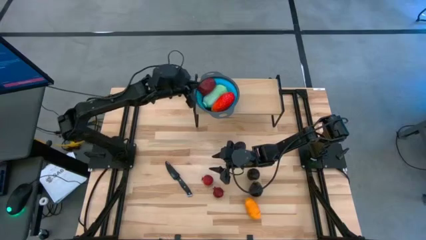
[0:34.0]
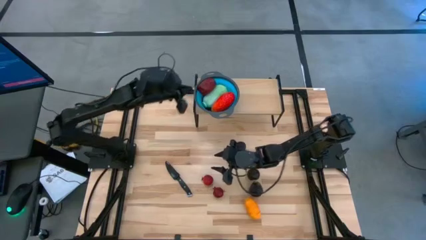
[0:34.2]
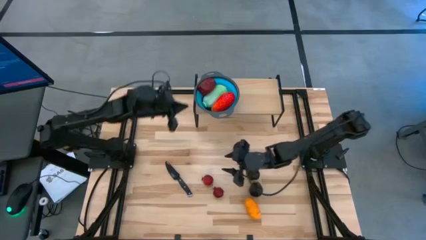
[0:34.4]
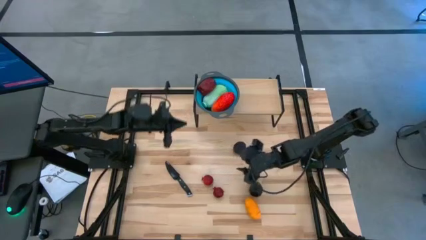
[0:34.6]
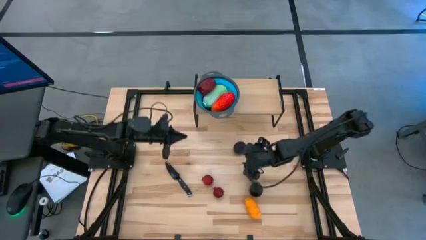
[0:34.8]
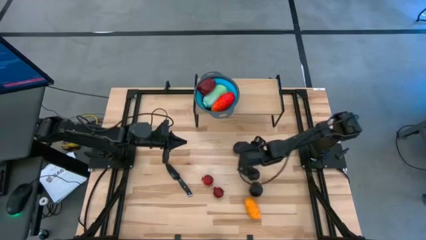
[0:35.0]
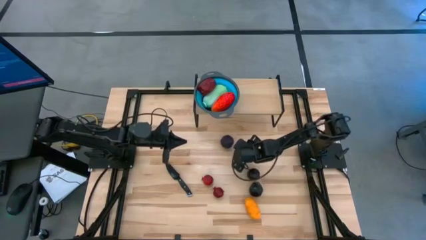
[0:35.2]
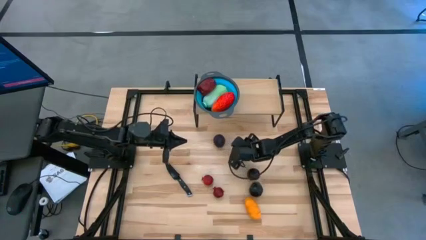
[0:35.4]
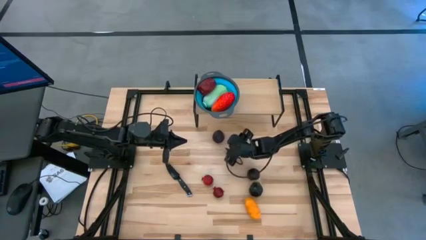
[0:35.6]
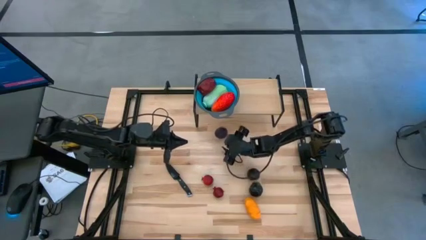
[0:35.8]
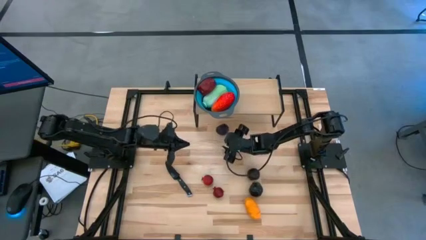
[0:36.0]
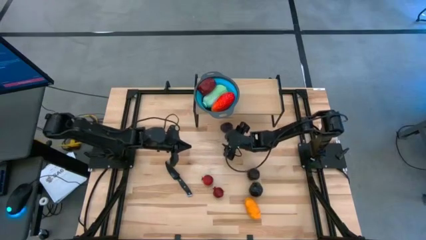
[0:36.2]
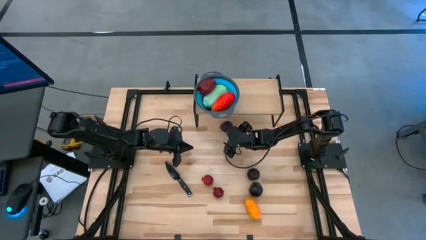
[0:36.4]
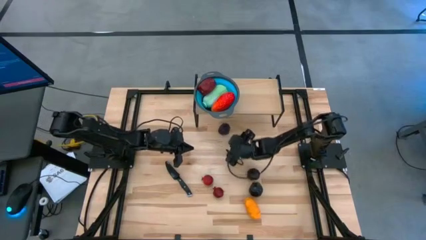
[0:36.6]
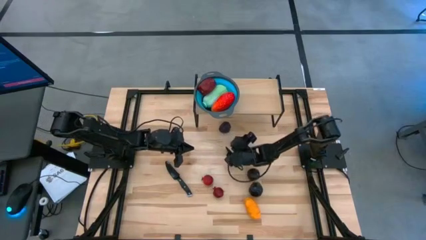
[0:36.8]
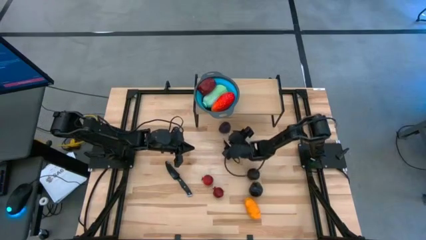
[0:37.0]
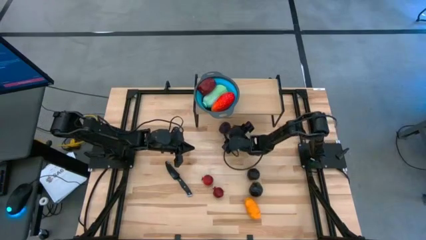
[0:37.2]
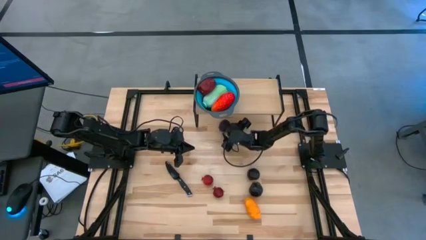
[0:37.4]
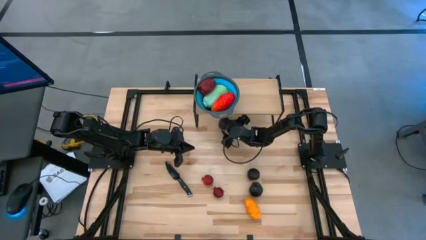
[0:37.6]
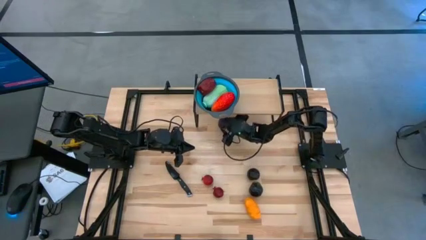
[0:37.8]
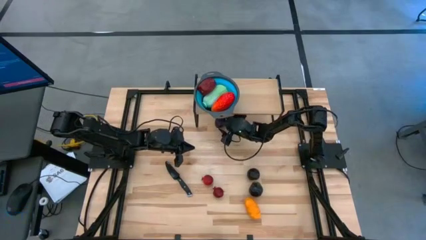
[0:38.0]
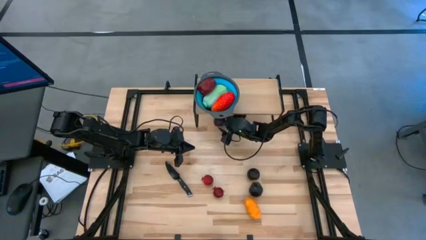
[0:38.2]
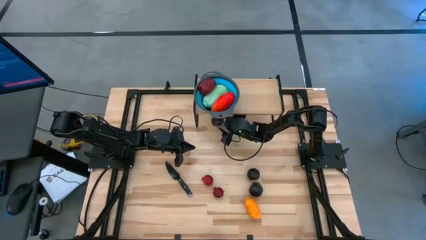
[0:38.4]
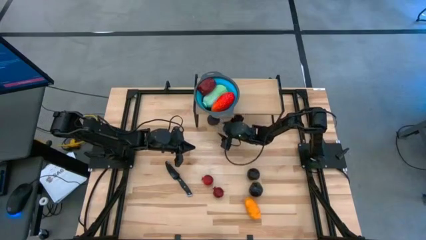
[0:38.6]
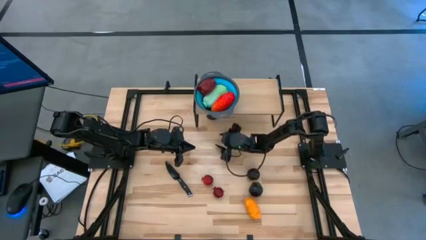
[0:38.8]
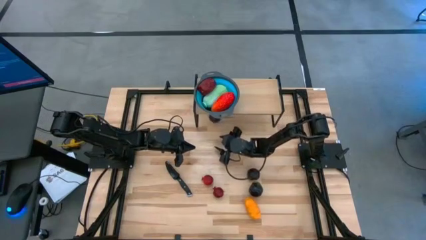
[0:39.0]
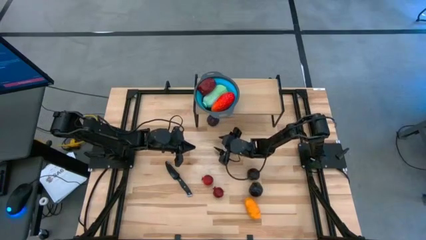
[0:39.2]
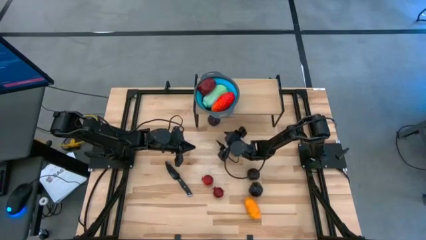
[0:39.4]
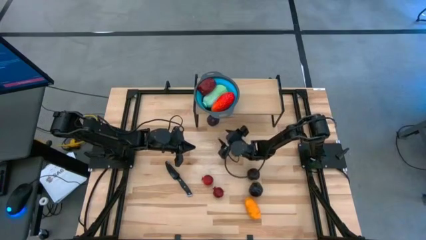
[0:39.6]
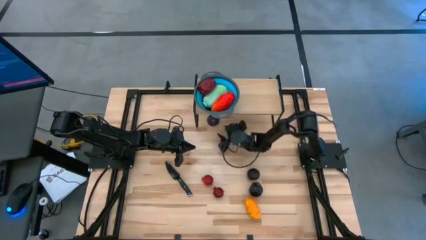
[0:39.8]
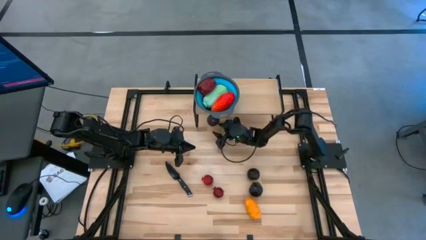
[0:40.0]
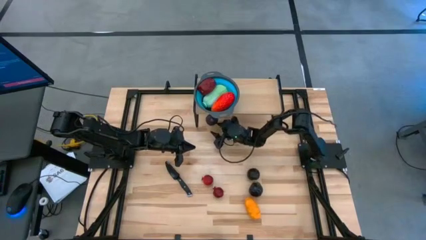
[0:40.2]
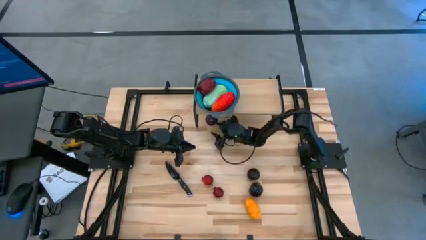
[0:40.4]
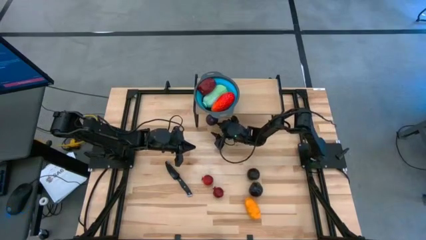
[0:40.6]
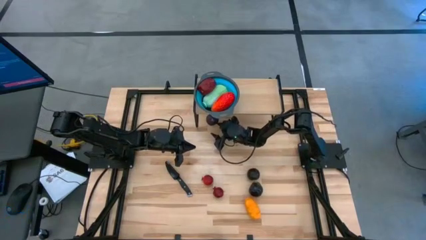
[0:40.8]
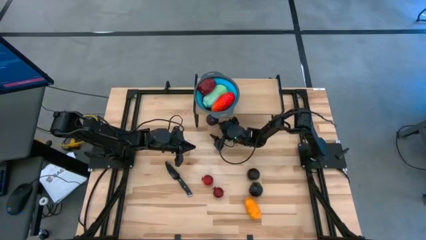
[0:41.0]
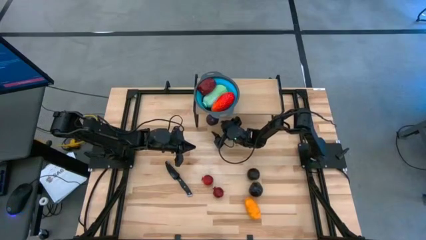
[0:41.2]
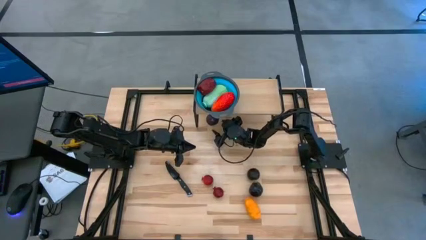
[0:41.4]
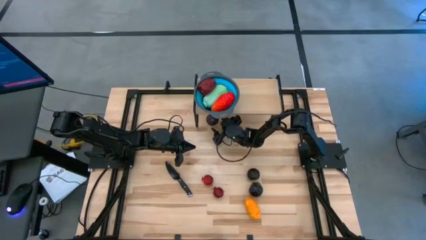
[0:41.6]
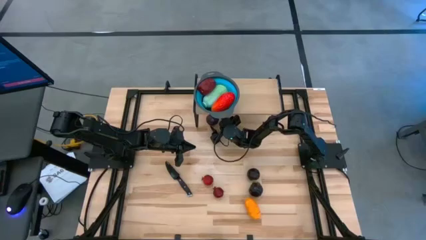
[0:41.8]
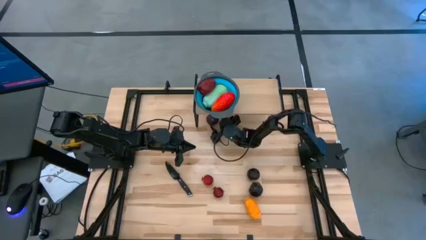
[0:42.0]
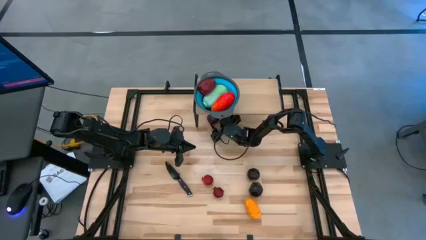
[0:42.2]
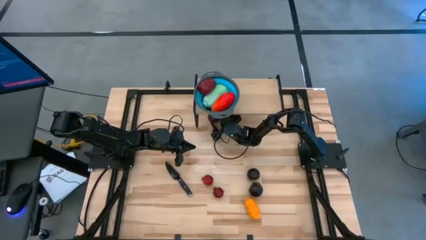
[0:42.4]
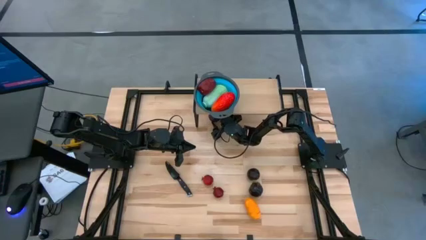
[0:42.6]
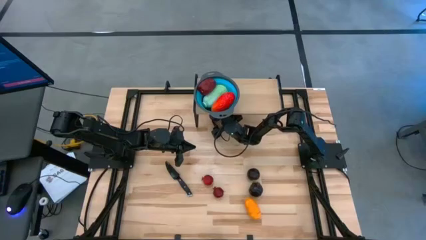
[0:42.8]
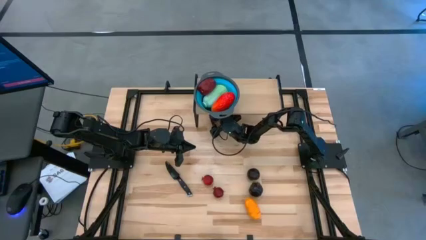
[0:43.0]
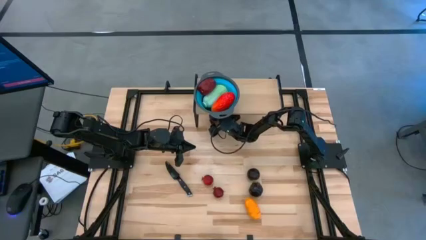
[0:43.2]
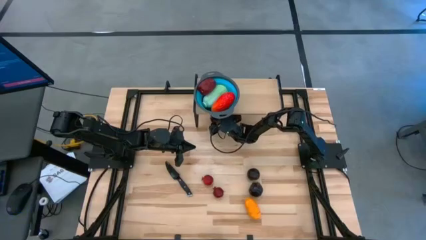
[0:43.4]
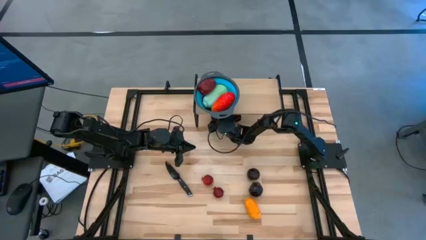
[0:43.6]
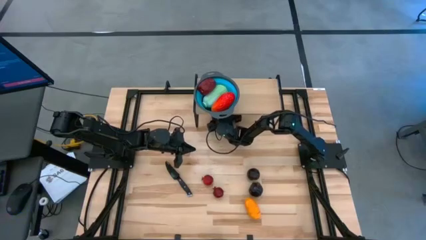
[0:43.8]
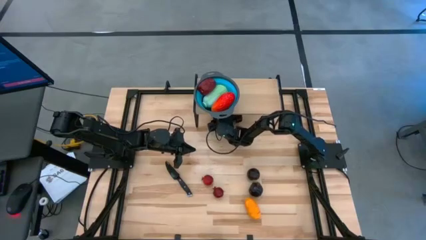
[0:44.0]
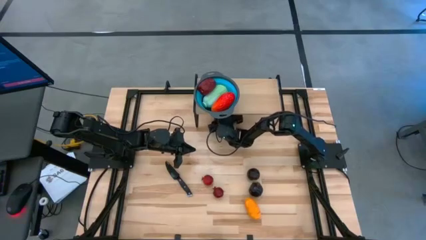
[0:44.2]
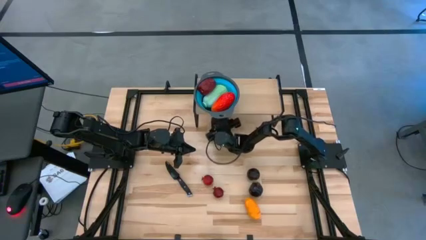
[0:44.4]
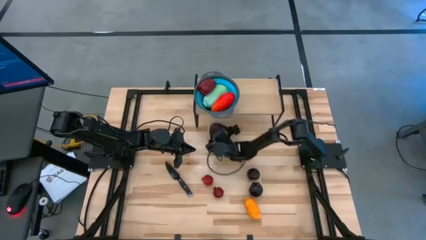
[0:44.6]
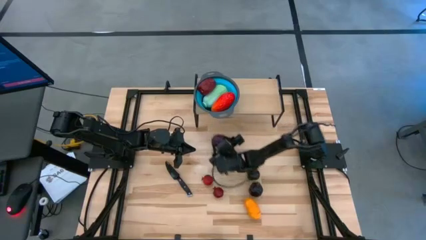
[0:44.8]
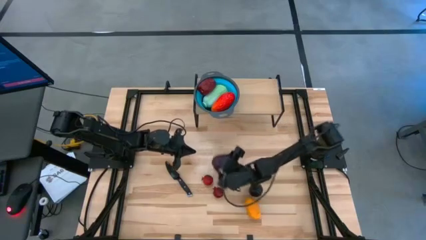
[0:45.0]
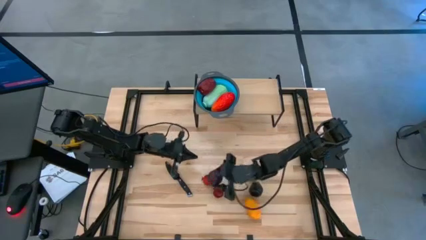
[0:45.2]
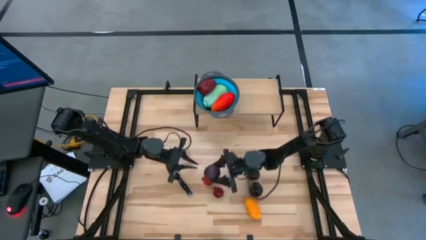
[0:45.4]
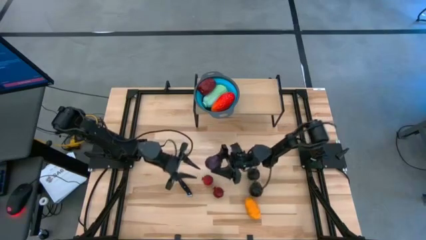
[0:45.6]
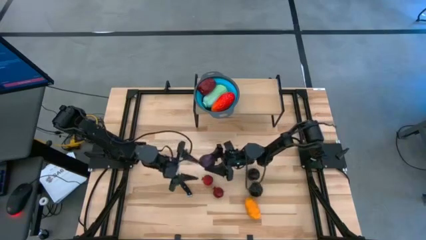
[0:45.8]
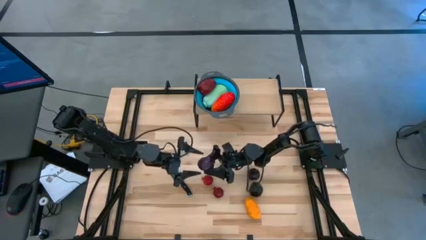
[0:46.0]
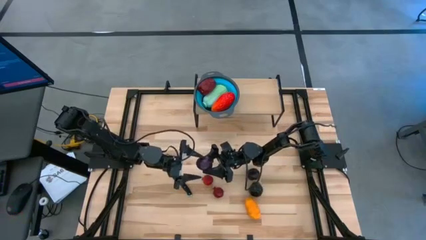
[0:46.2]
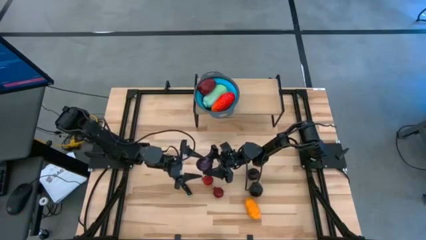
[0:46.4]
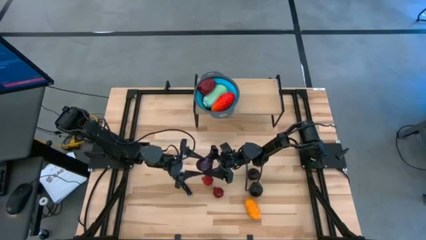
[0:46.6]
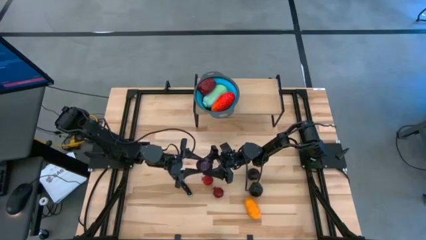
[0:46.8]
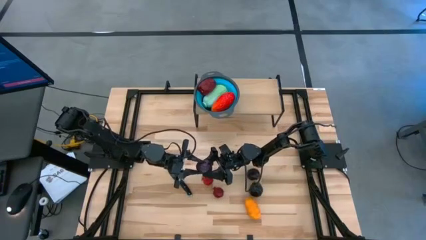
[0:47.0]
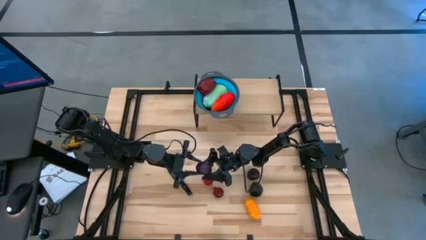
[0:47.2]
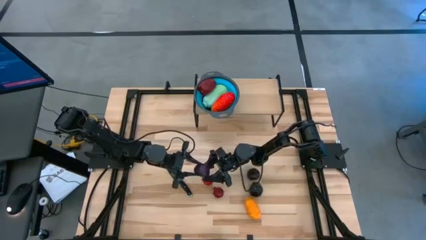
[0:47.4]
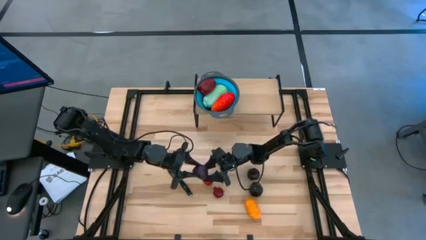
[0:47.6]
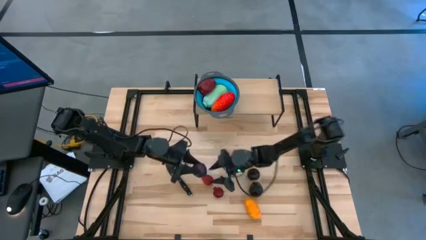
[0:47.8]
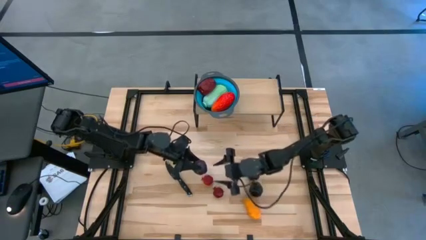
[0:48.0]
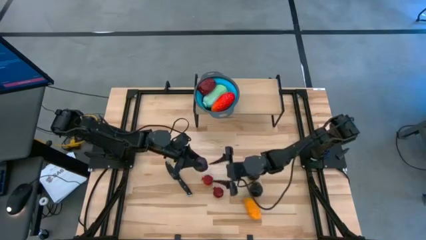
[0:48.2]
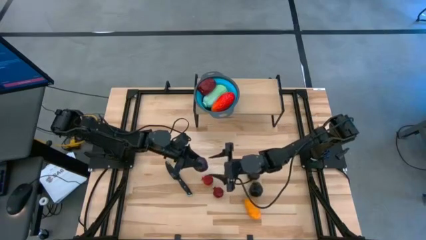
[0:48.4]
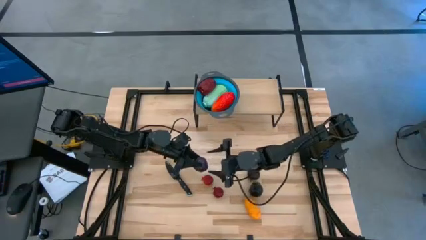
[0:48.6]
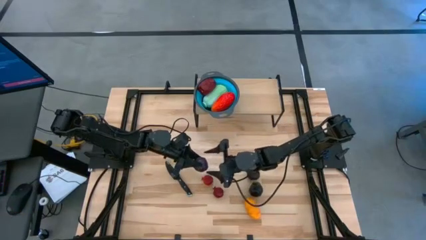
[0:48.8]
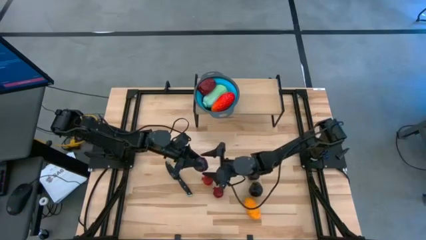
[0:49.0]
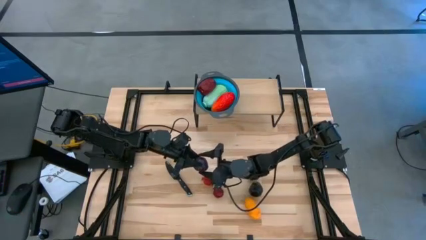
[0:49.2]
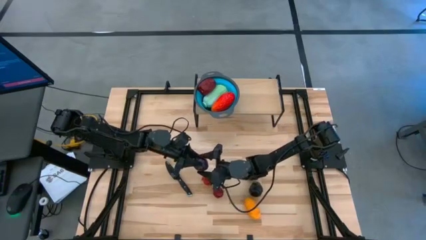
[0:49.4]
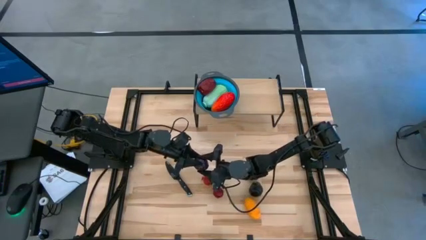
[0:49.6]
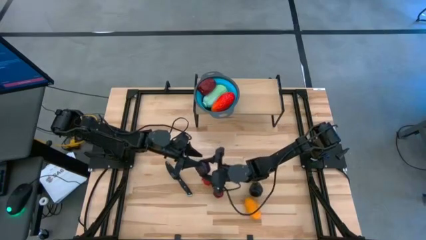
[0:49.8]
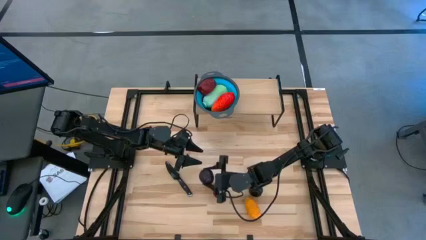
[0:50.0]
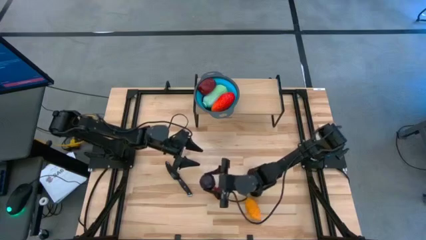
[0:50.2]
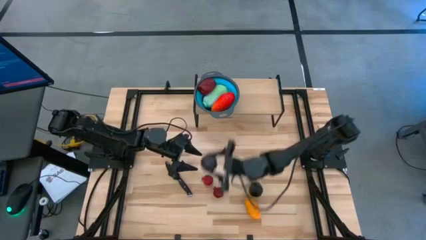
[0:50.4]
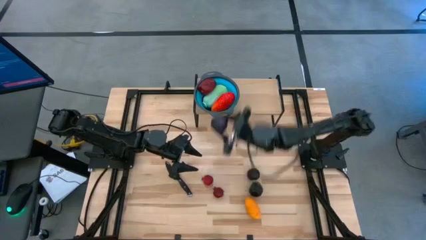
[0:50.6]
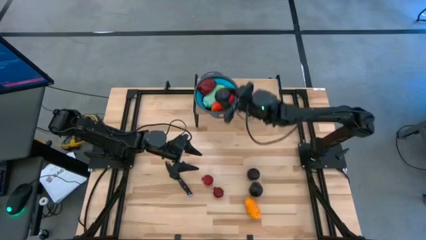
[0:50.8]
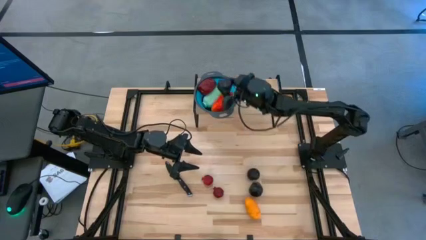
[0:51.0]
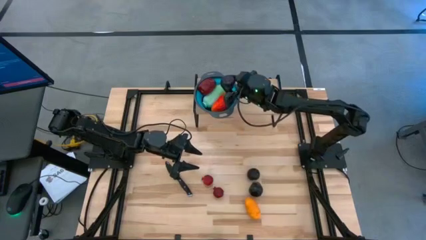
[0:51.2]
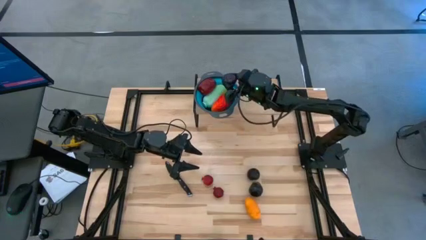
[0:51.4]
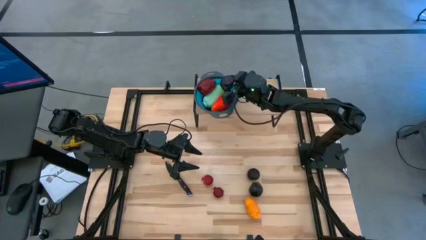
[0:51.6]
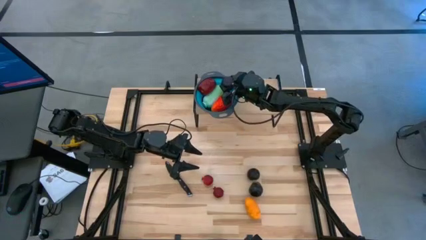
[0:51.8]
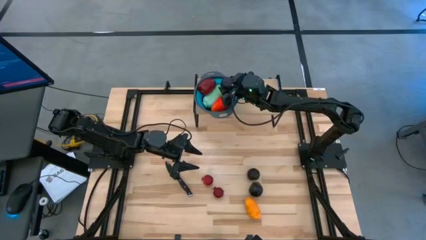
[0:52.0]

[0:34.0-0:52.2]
Task: Pick & Place Fruit
Put the top black plum into the blue strainer bowl on the shelf
